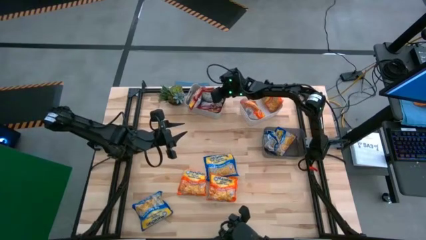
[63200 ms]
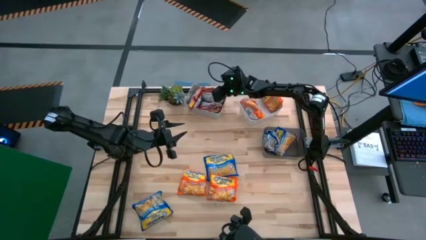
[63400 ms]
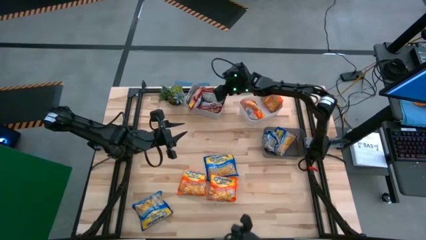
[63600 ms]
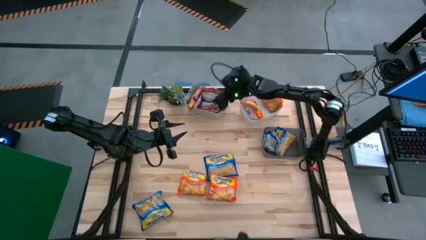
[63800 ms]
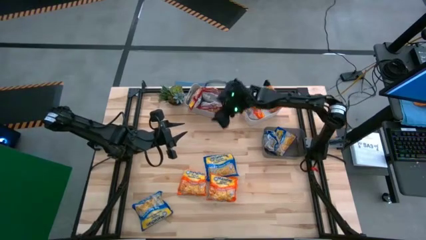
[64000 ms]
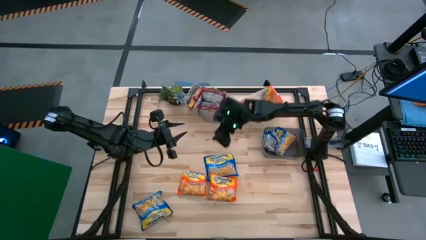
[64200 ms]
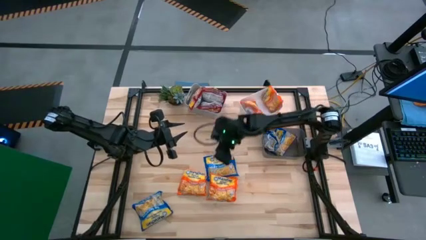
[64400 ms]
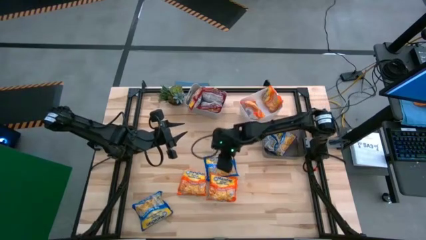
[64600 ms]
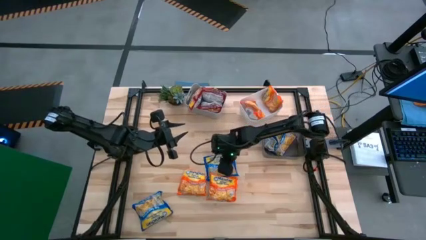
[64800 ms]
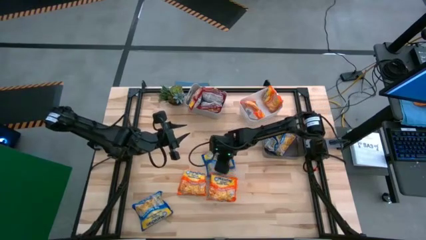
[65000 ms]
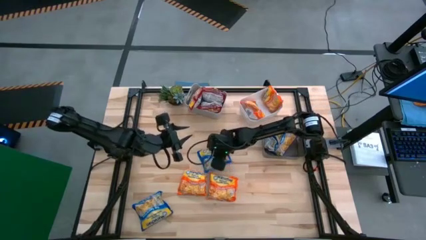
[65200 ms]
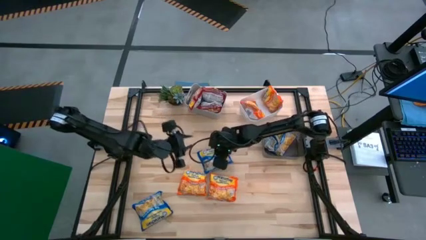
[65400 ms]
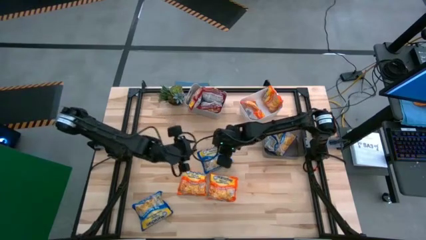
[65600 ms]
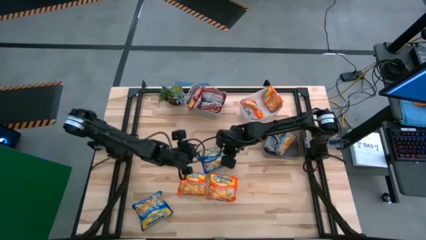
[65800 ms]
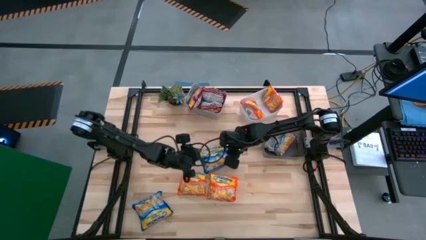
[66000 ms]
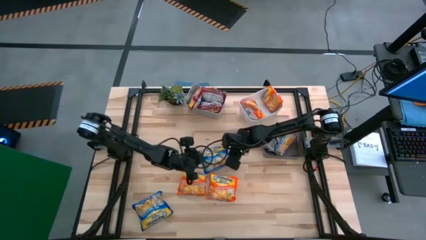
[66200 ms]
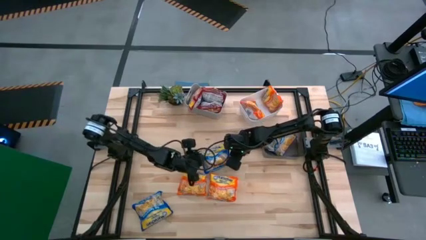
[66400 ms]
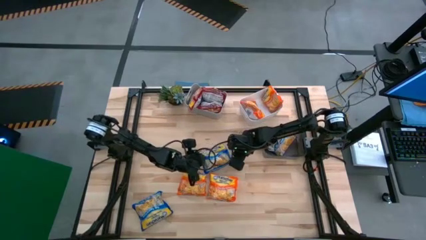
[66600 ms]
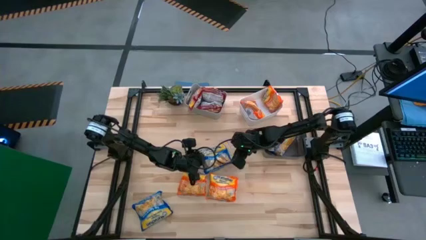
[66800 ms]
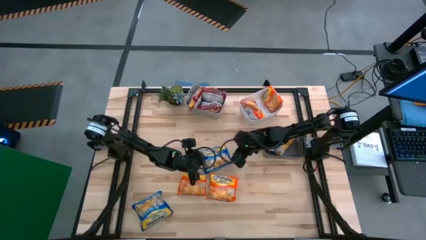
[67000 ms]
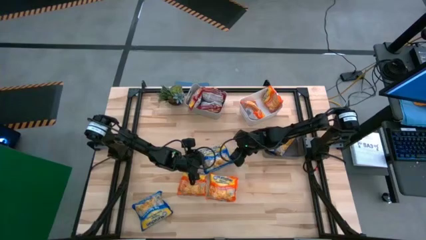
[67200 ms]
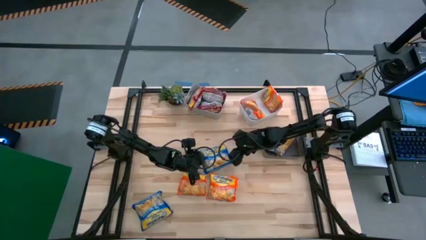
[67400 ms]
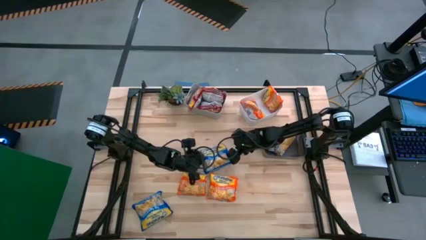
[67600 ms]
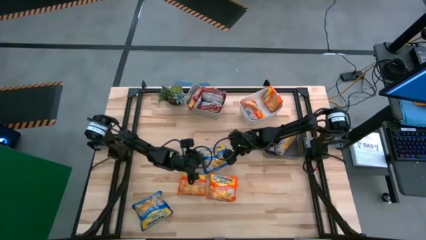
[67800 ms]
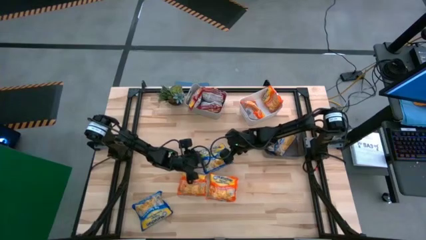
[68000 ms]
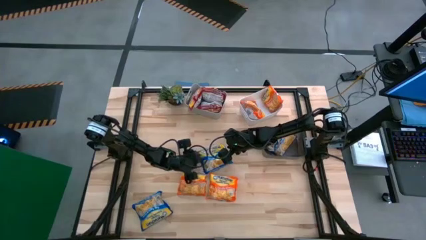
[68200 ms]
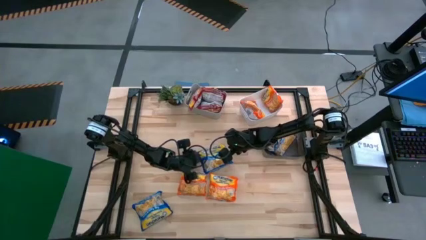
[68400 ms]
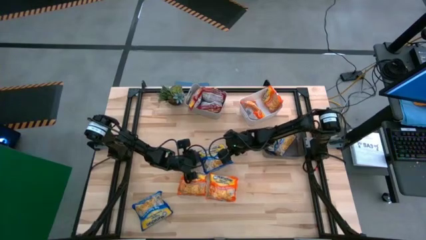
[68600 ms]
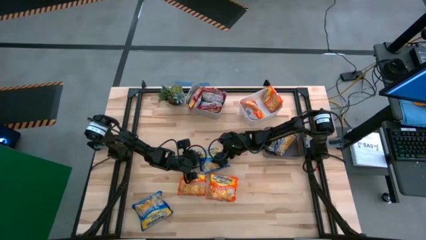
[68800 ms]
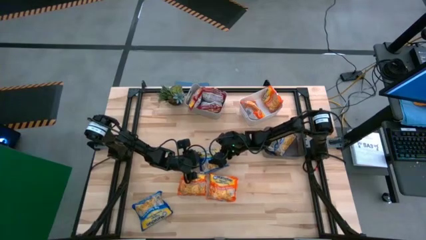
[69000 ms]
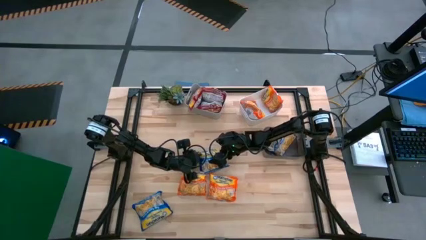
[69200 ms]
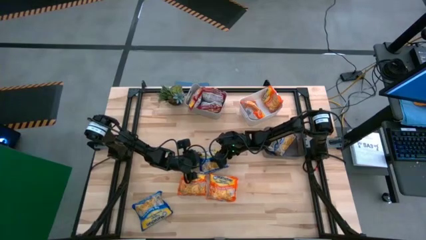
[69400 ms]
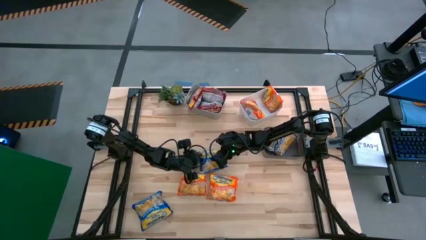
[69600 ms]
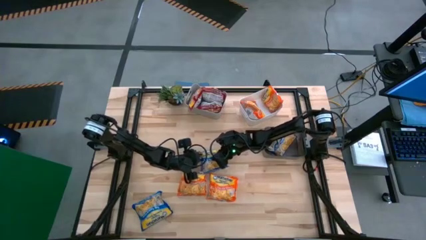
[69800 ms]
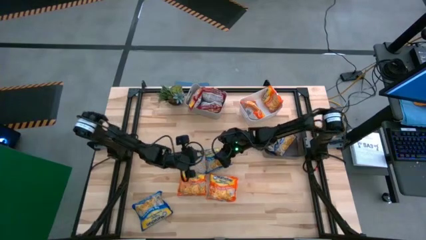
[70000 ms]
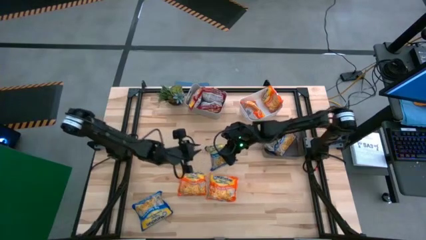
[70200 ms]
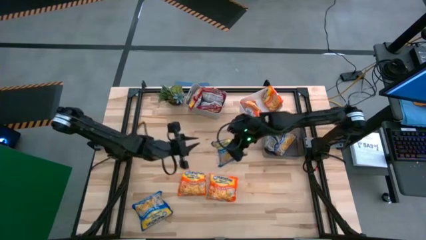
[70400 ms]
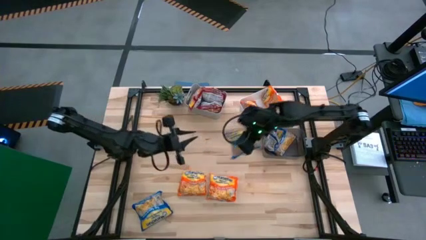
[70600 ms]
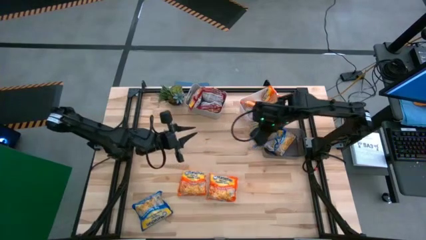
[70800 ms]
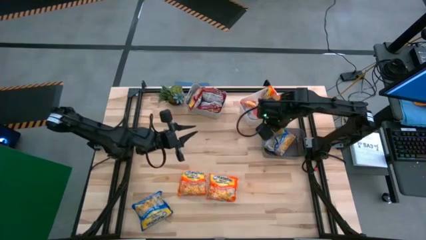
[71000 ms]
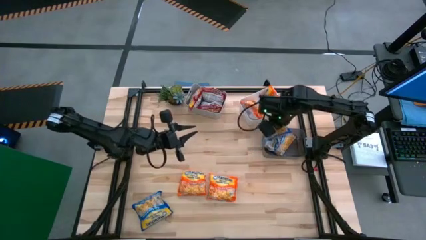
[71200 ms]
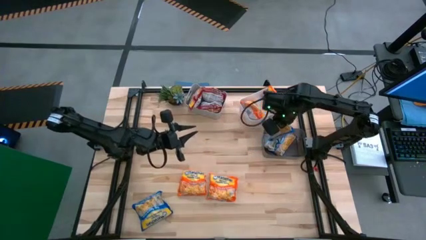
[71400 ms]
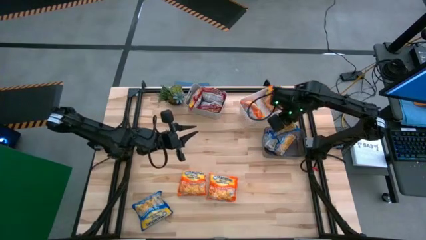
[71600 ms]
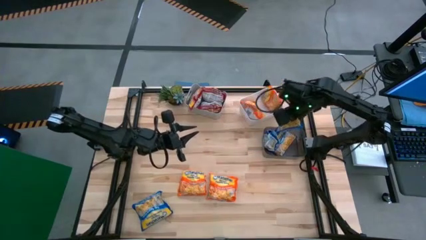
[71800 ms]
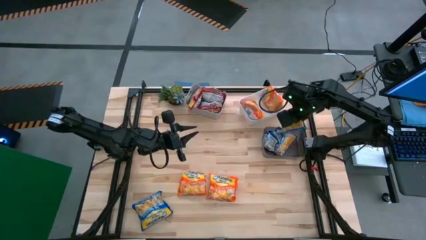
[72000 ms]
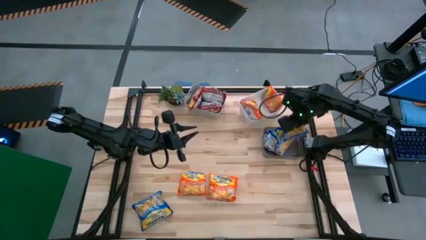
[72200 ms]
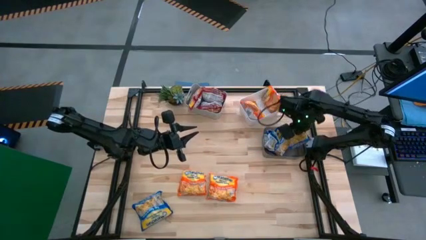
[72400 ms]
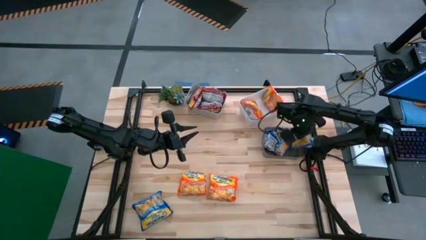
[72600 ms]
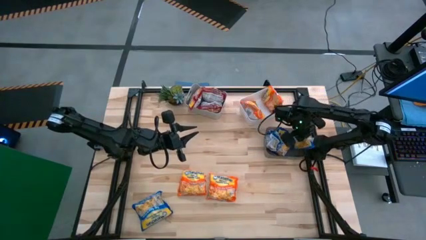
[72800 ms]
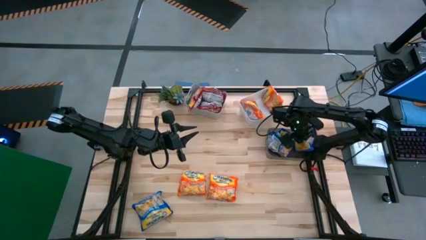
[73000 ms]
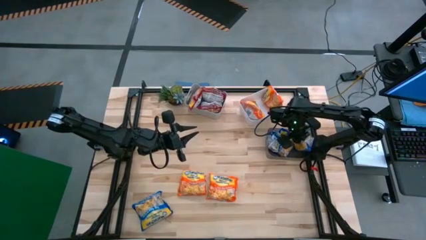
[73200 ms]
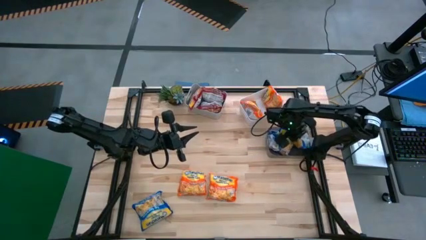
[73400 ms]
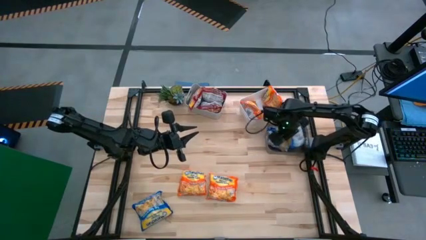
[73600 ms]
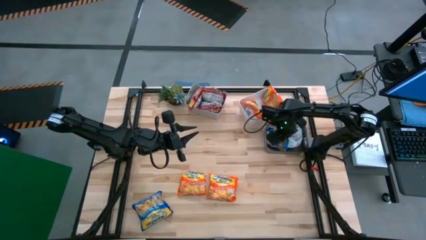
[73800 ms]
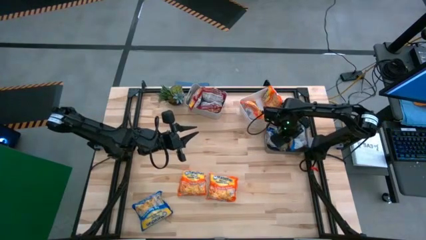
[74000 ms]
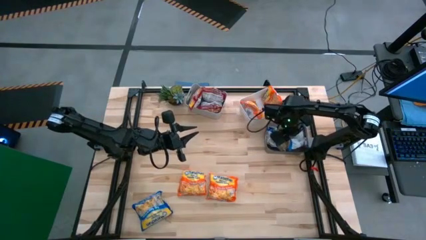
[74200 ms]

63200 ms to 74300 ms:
Task: Sort Maruchan noodles
Put the blue noodle pack into the black bin

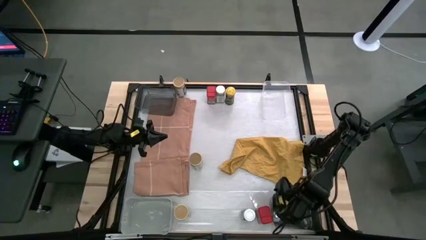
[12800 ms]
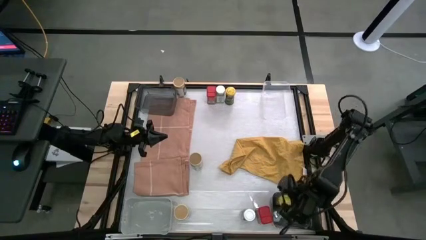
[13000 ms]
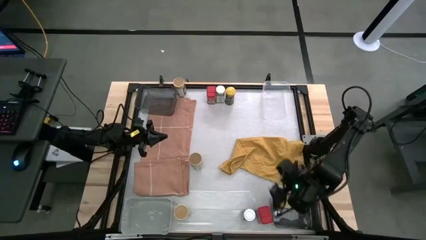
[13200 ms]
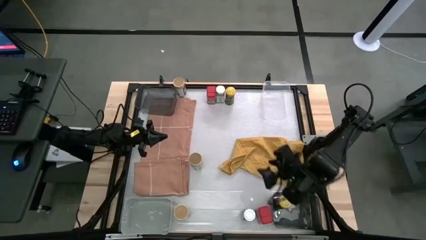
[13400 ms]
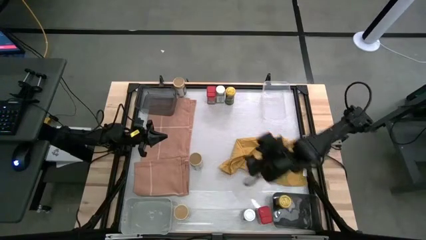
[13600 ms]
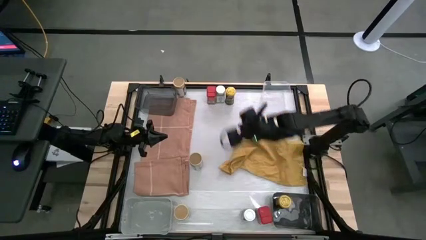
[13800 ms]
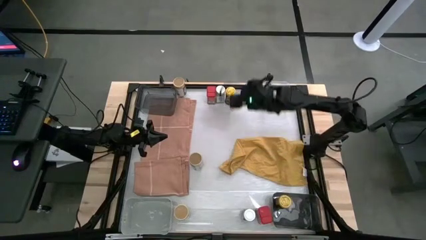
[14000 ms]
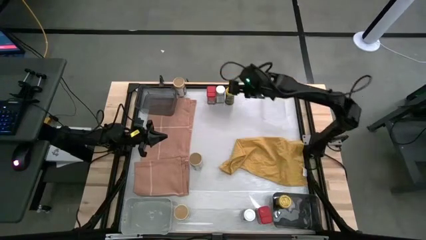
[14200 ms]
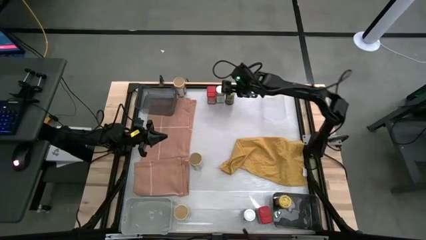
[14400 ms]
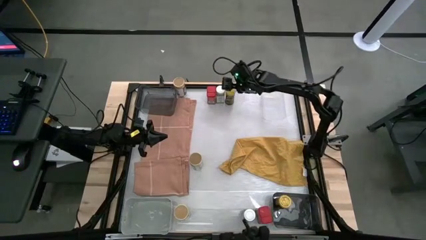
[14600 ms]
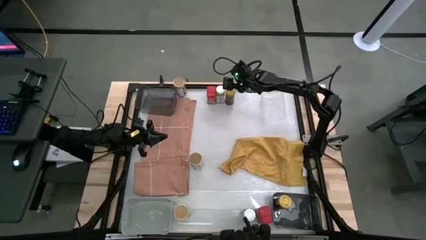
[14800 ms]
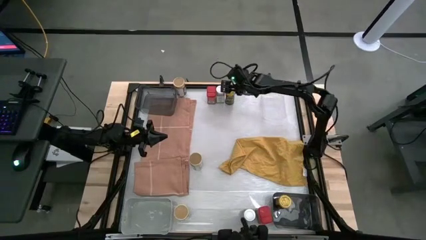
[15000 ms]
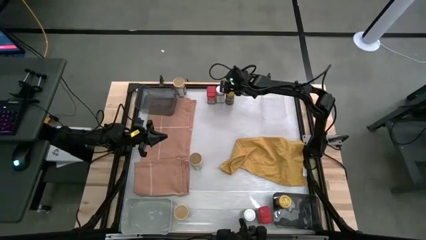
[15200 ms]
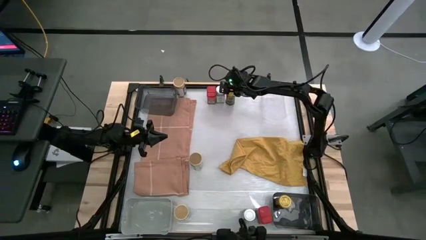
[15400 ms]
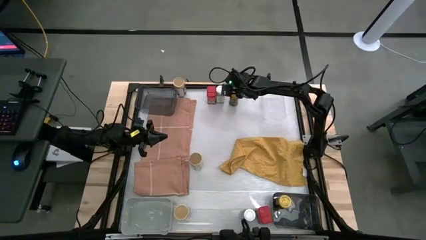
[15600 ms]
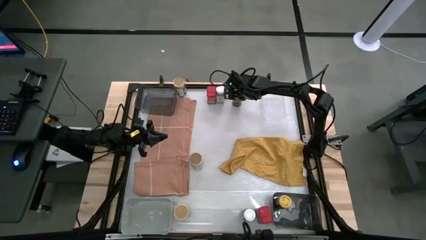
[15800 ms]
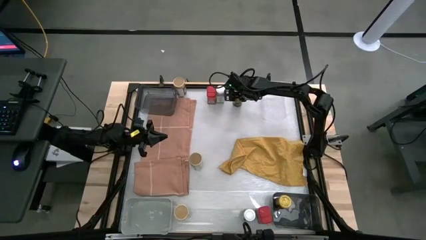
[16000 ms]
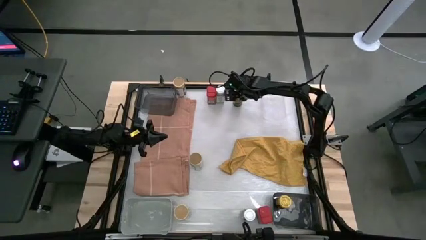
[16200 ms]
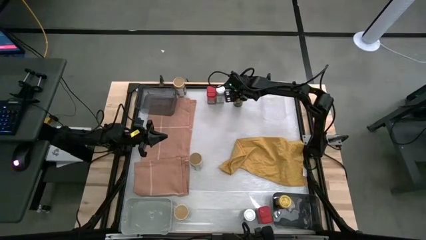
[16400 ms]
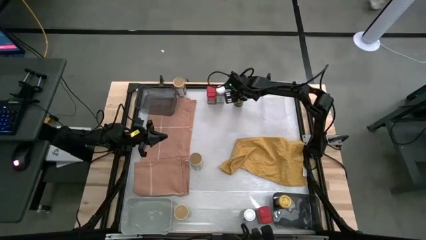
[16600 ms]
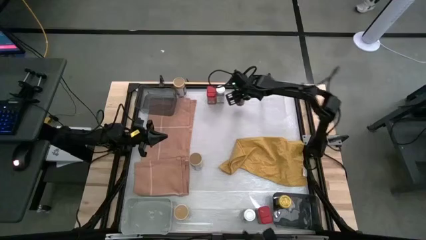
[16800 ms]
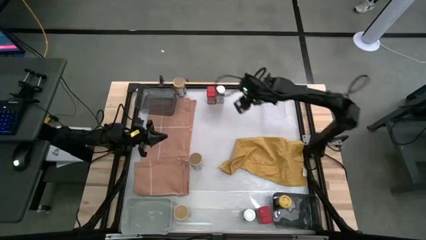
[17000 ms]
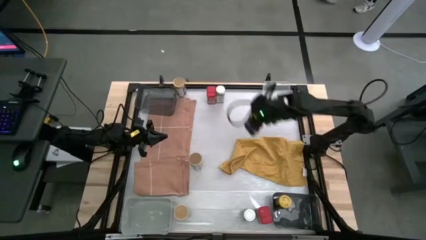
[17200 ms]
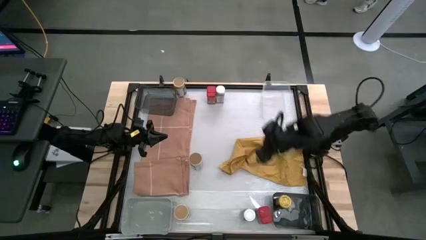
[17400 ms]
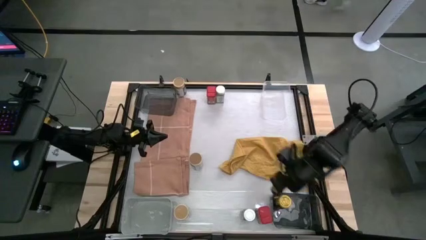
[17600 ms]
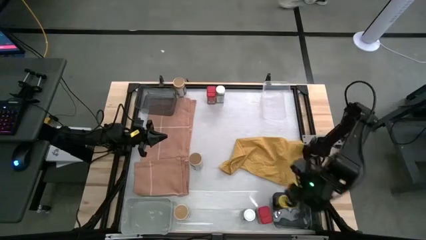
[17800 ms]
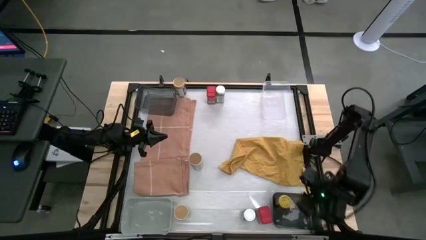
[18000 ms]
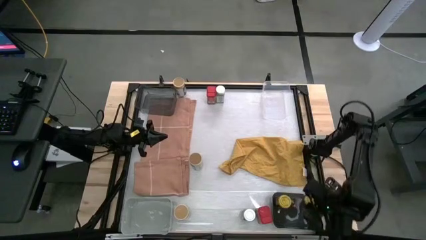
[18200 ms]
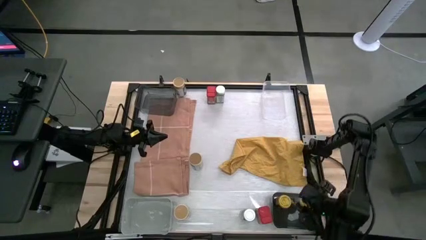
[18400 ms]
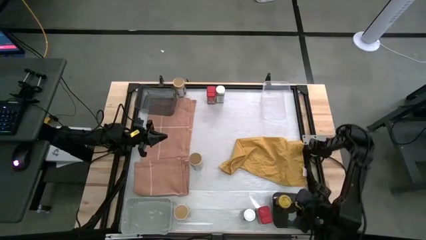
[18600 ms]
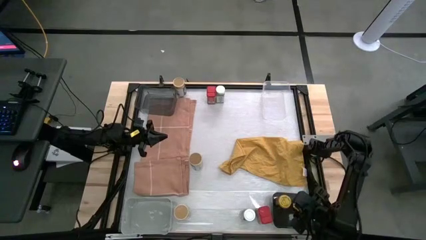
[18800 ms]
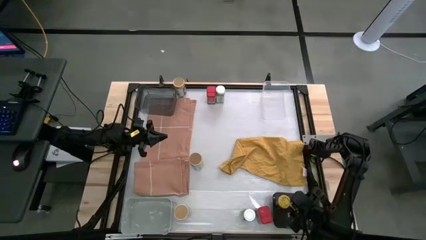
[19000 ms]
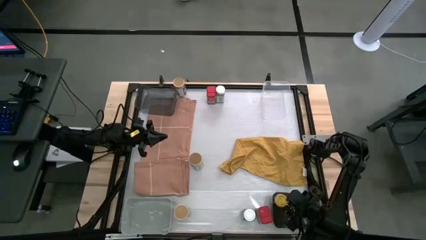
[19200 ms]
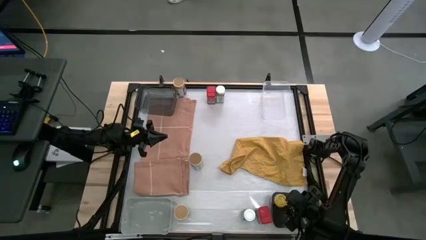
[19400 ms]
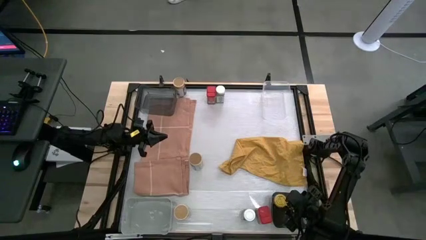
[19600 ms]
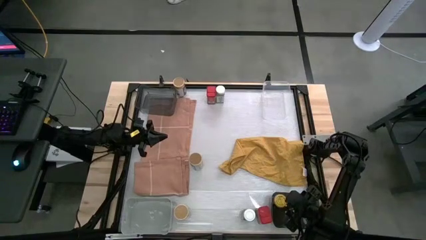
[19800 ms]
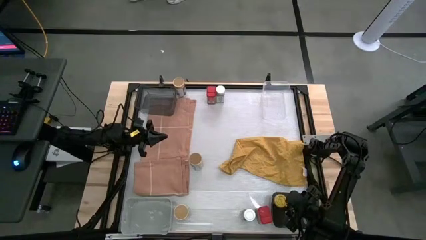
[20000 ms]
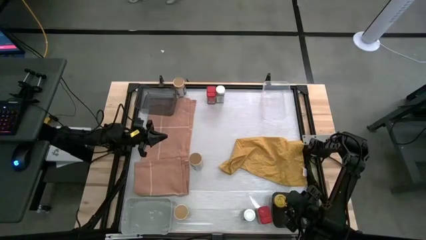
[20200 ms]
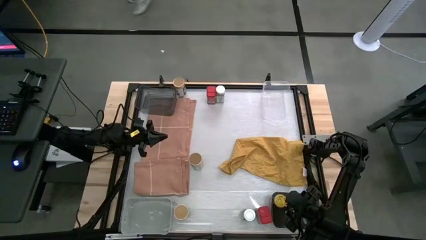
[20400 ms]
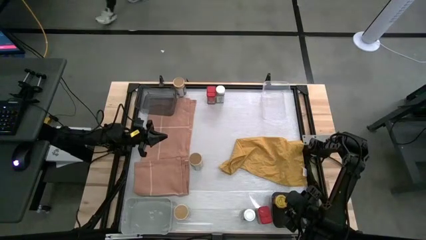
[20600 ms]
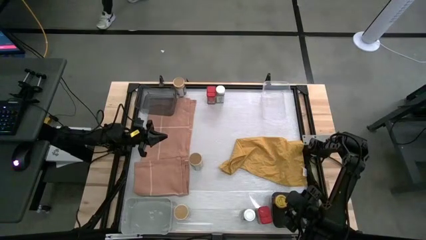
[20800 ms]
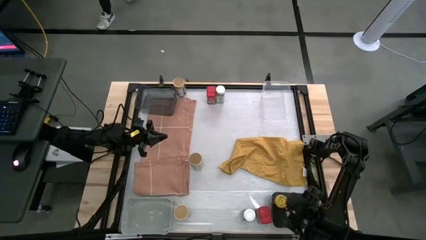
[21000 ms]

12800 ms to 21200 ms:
Task: Sort spices by type
Put the yellow seasoning bottle into the bottom black bin
